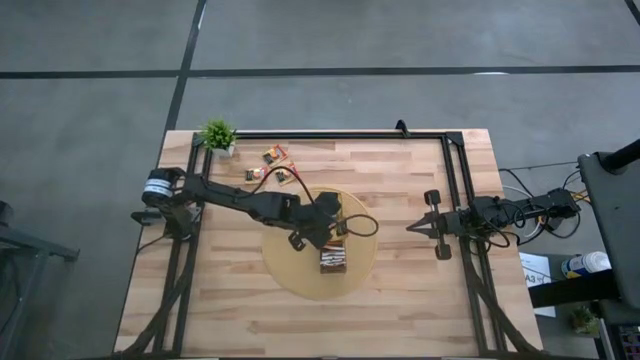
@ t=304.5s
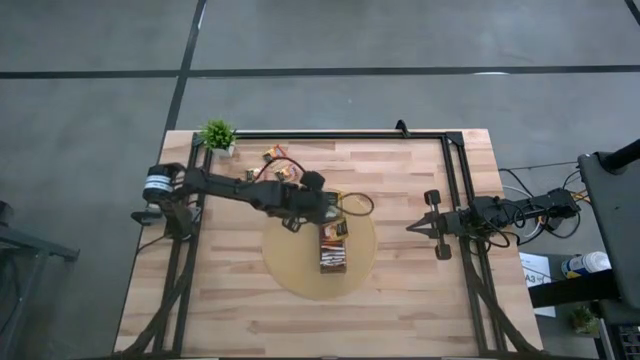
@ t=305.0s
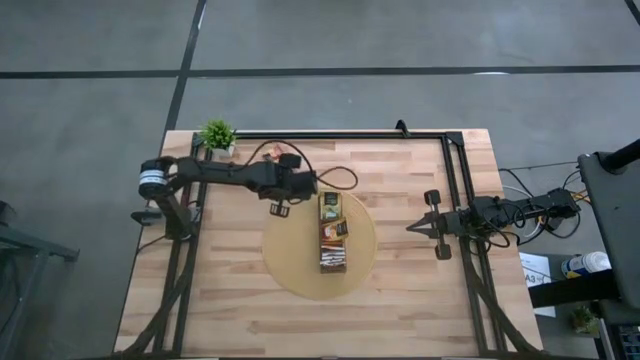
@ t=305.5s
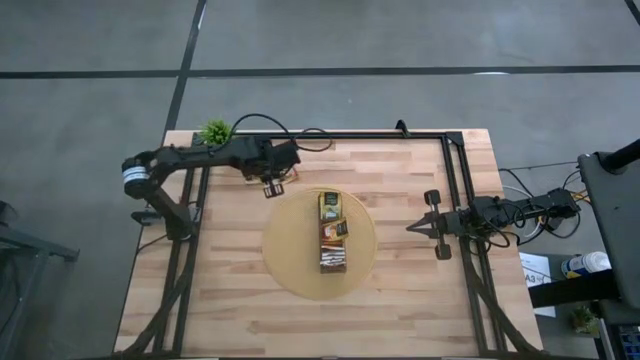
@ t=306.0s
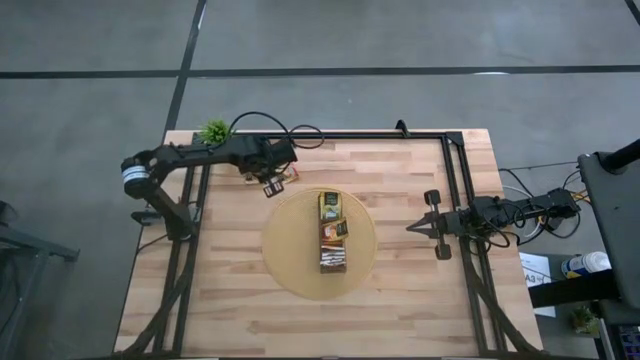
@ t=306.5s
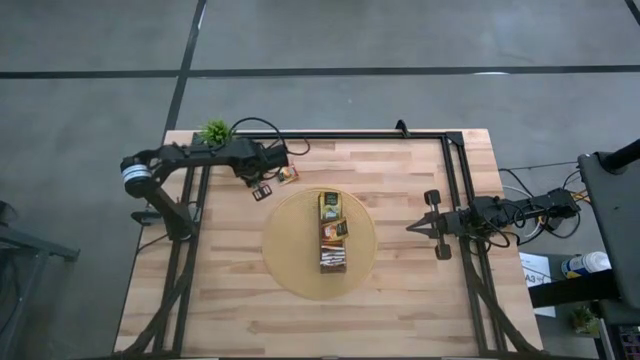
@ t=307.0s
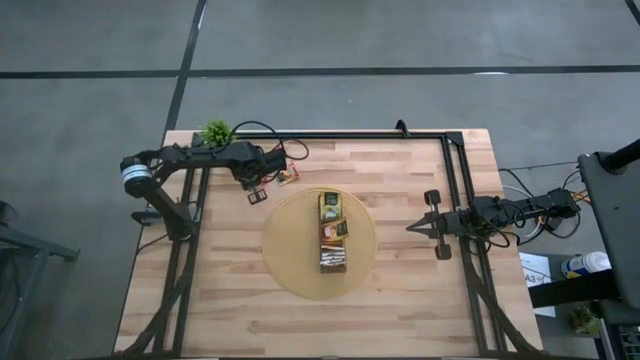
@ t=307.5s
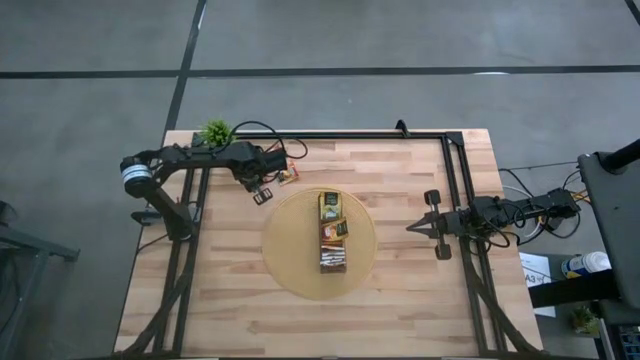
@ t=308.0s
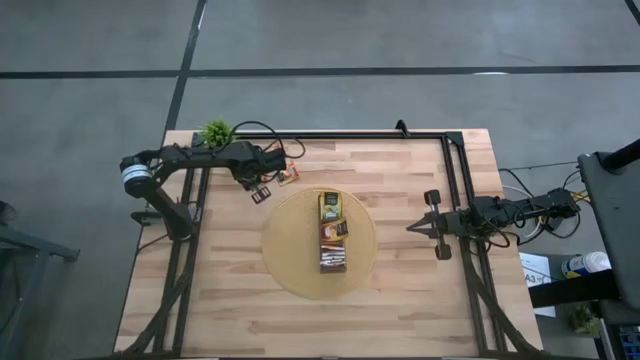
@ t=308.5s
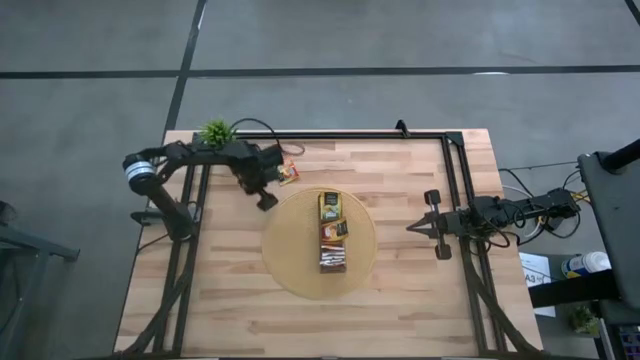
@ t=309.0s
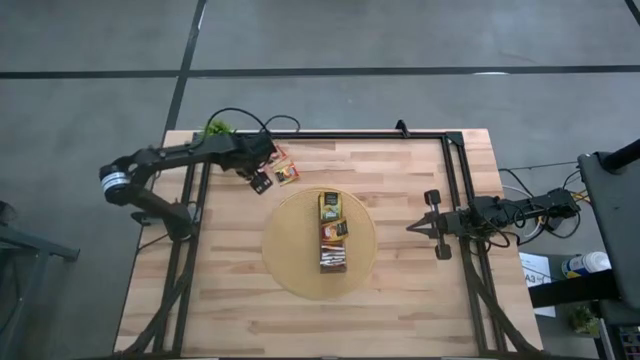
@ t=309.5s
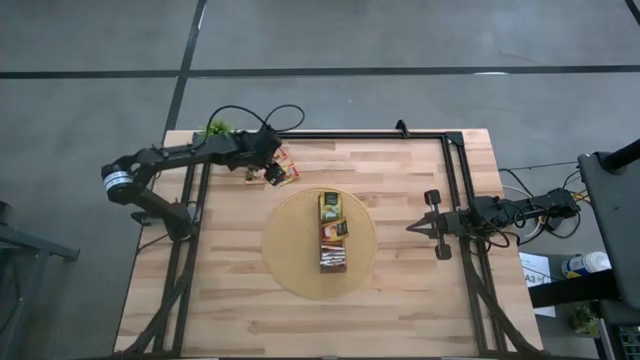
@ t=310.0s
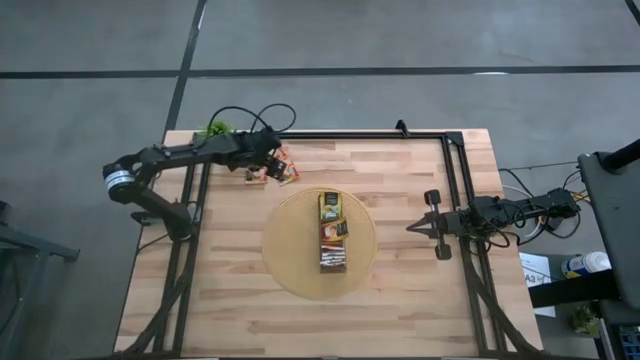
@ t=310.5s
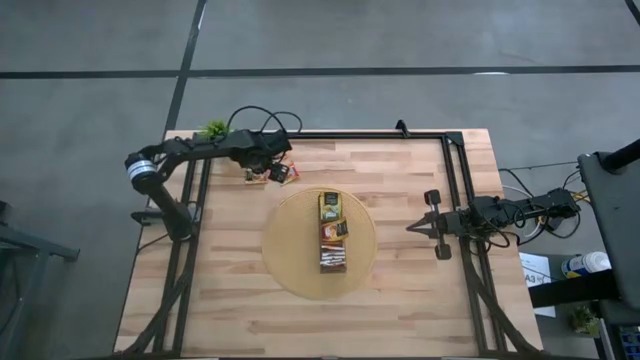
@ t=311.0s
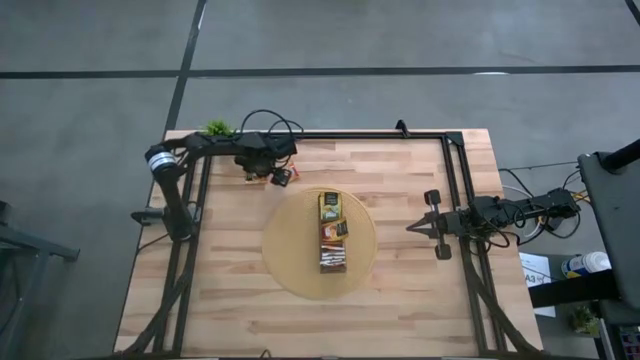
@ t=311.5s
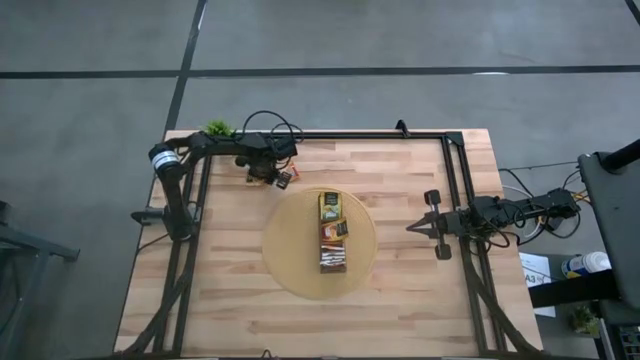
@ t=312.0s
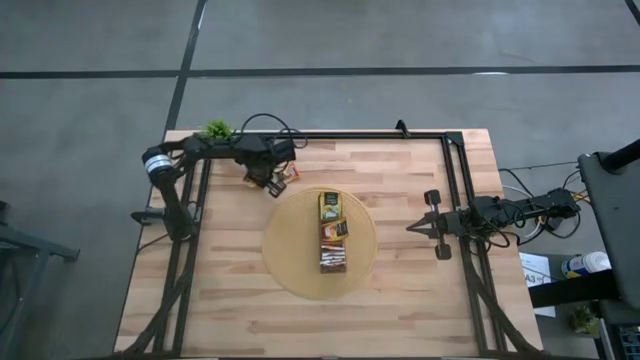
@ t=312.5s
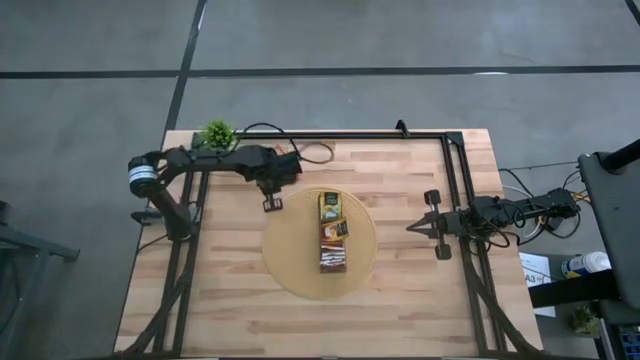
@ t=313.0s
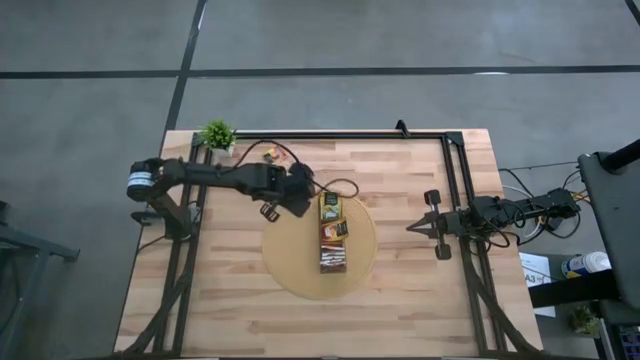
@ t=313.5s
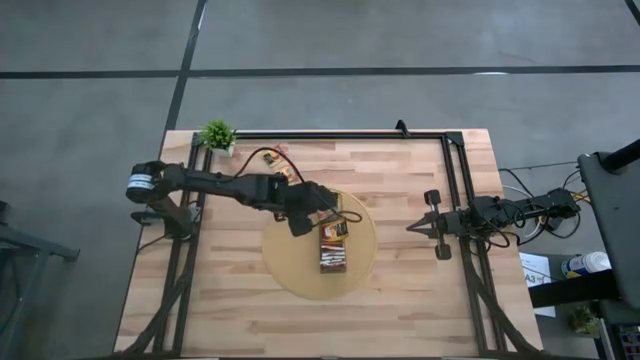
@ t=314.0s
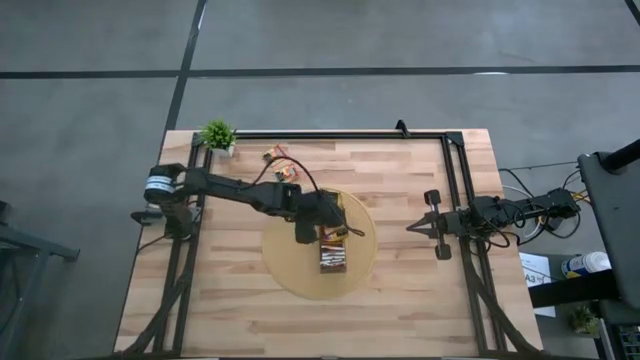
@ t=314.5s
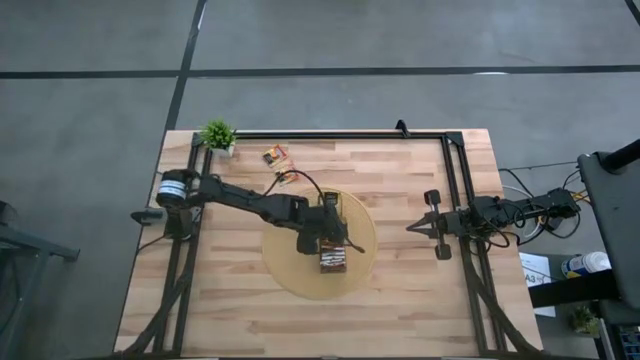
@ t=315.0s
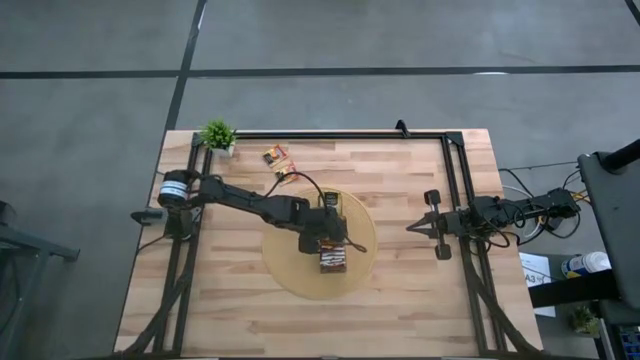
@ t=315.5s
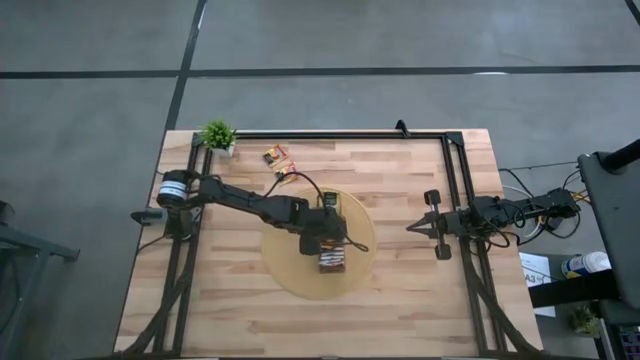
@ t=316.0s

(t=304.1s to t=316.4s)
Task: Pick & Place Tea
Put the left orange tea bag into the middle section of the wooden organizer

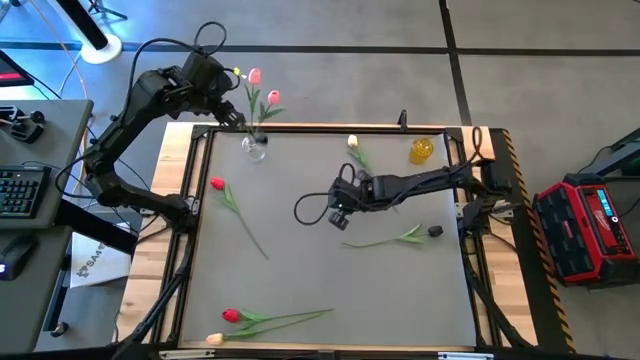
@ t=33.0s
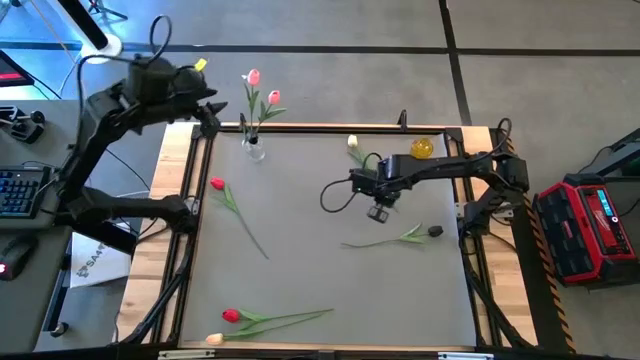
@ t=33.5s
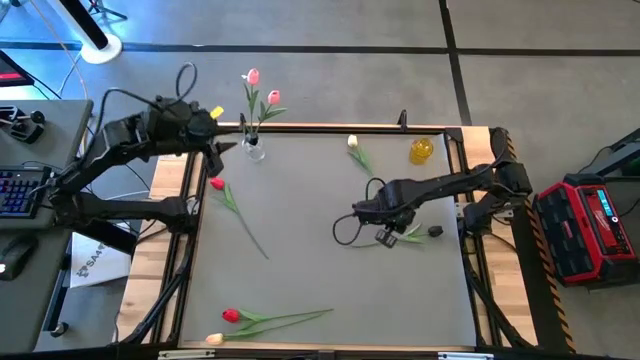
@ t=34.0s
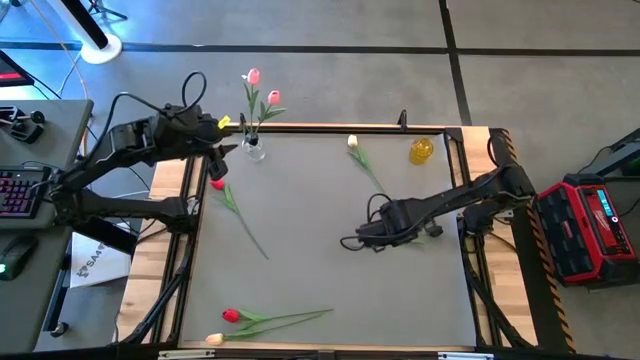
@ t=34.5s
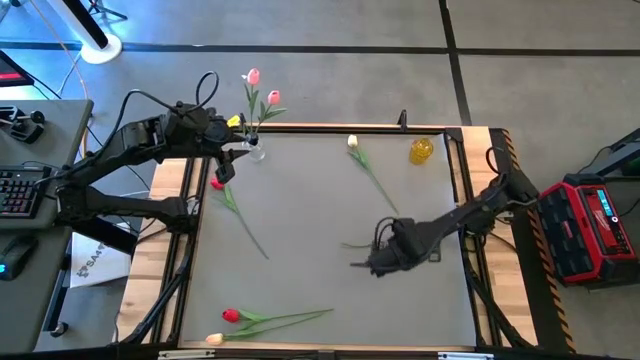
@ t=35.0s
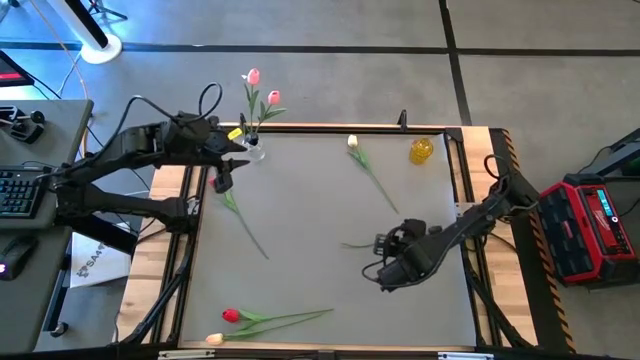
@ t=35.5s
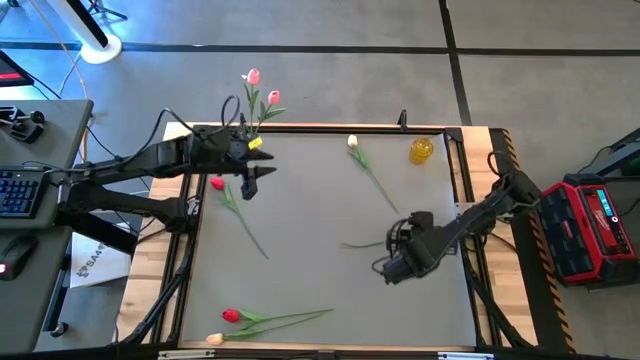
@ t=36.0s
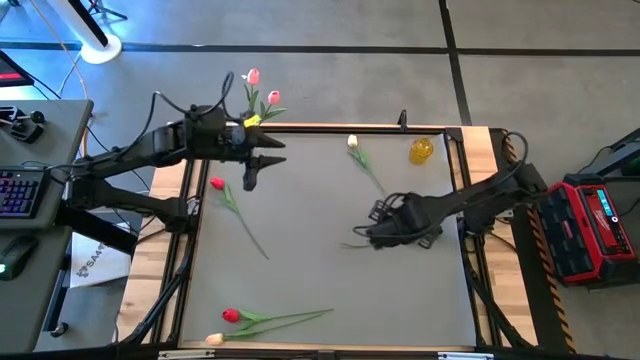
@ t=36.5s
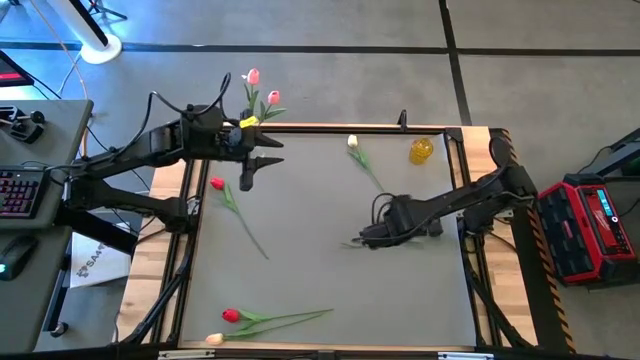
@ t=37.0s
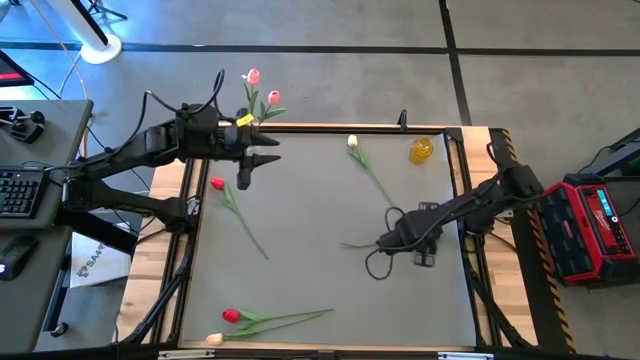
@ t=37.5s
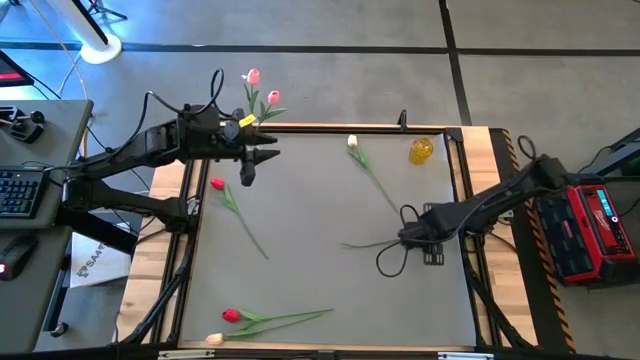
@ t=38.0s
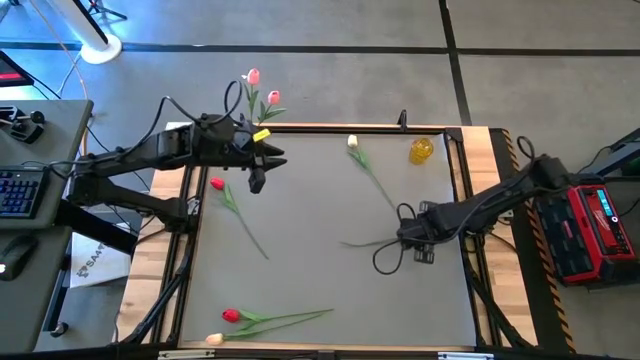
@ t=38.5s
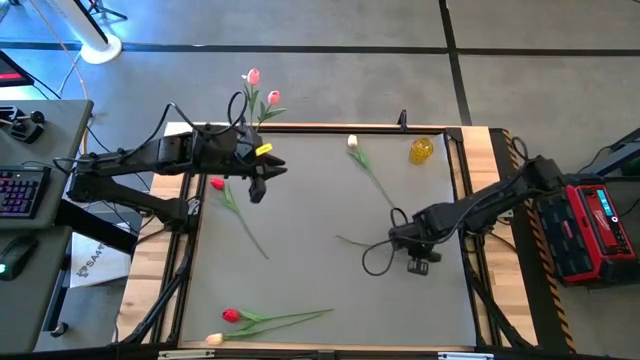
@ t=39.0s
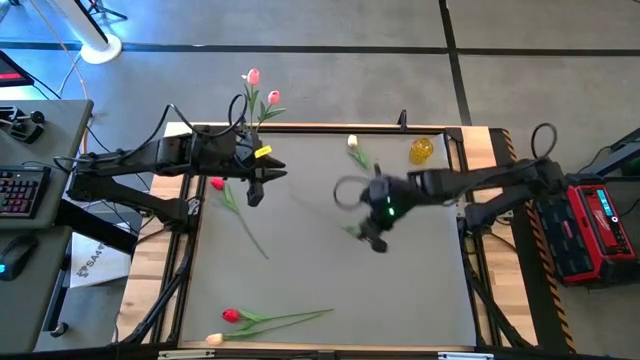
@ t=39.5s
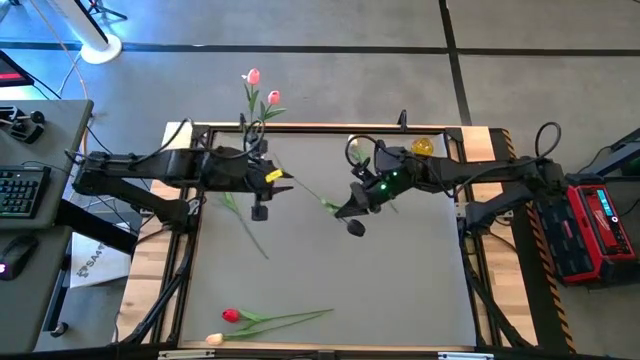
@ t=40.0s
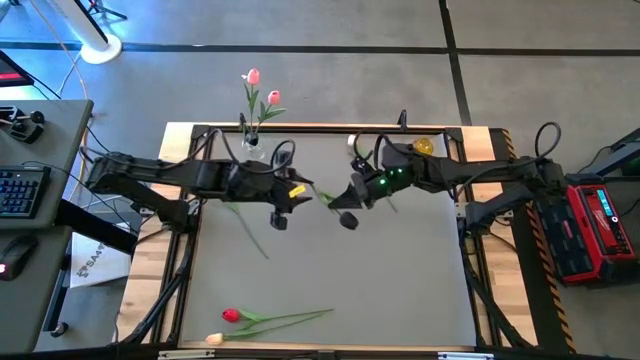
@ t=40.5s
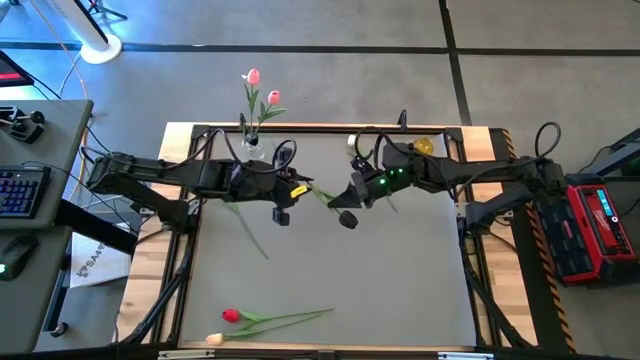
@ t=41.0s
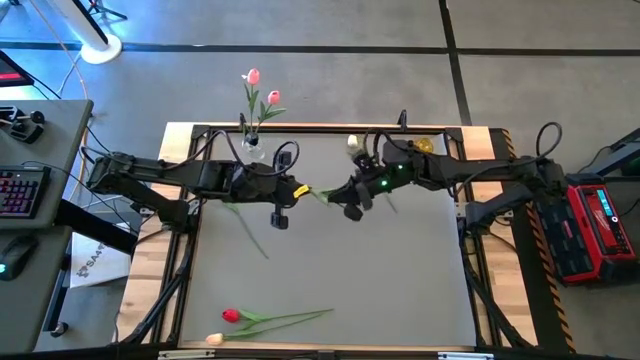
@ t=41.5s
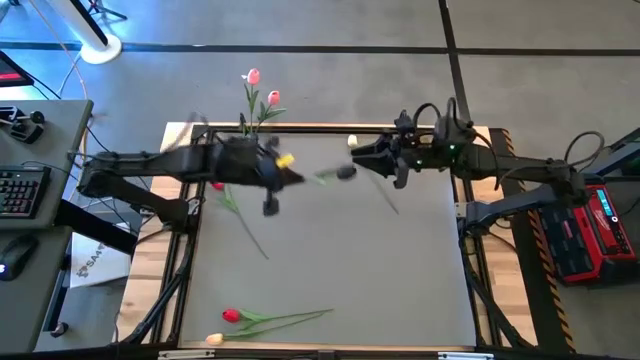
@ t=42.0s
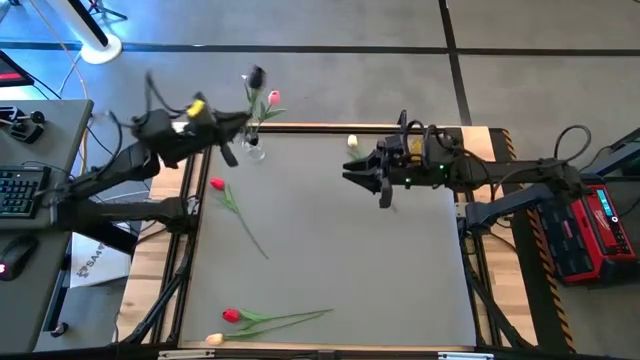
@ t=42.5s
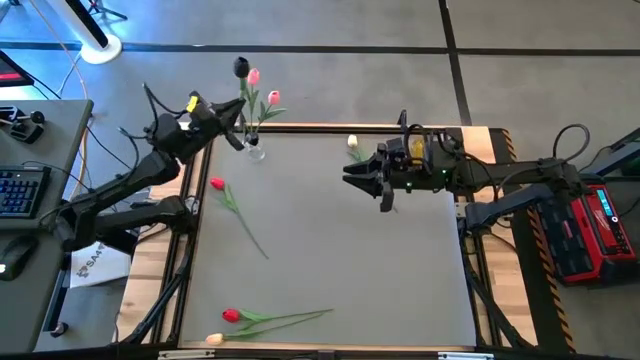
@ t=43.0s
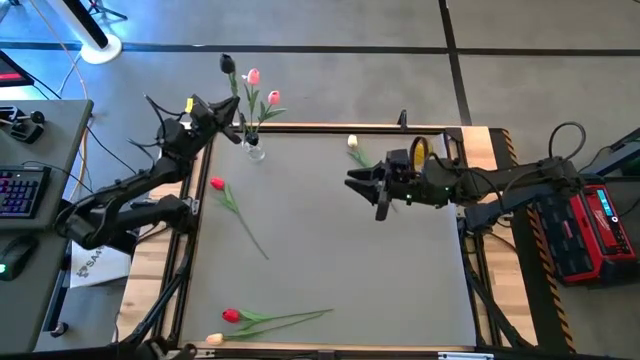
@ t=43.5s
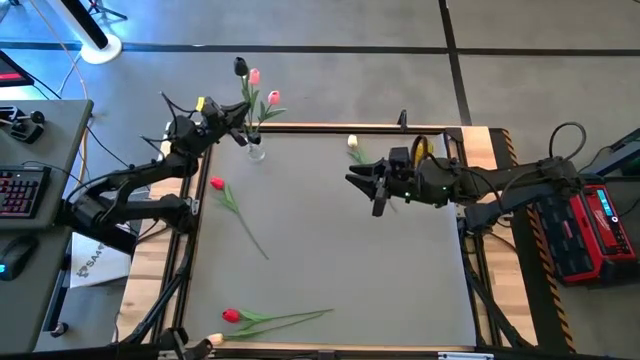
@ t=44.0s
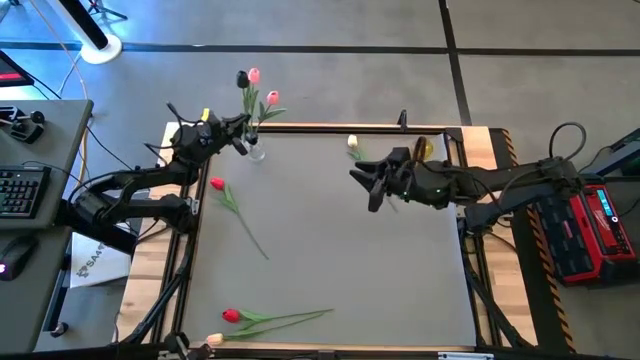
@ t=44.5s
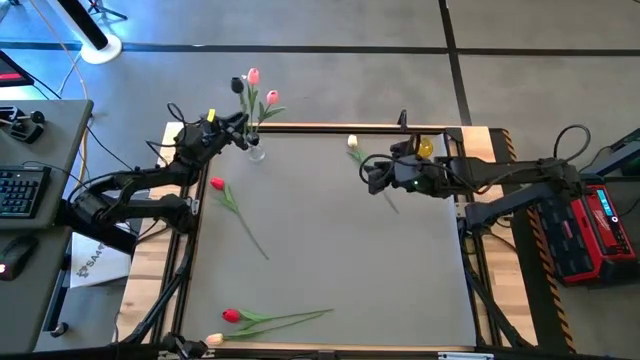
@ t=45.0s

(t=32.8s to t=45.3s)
Task: Sort flowers into vase by color
Put the black flower into the transparent vase
